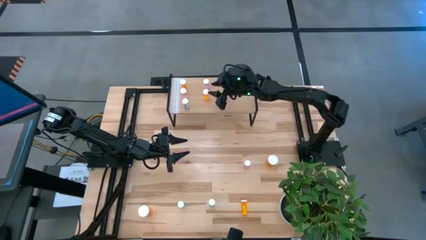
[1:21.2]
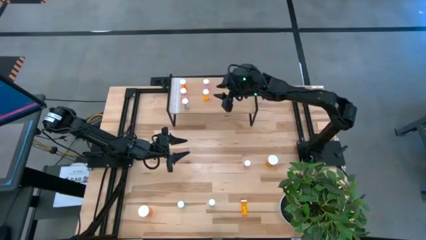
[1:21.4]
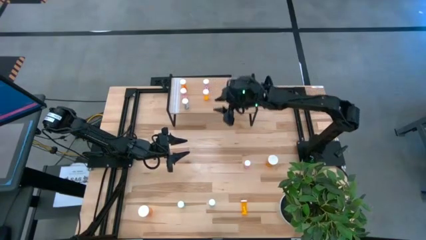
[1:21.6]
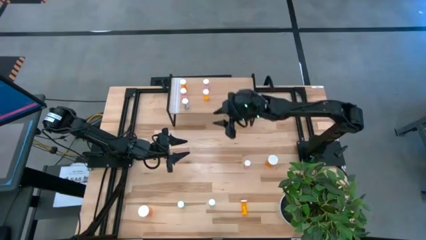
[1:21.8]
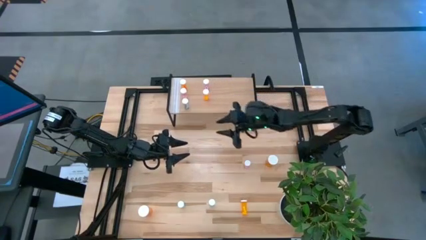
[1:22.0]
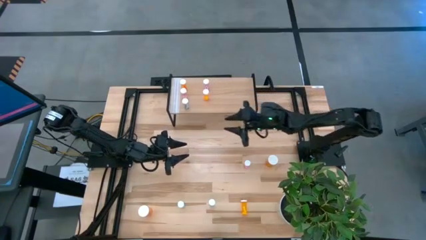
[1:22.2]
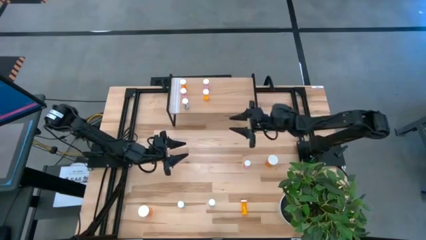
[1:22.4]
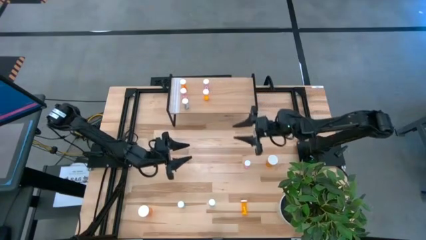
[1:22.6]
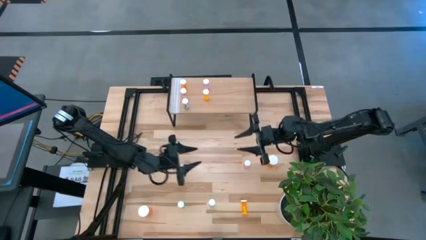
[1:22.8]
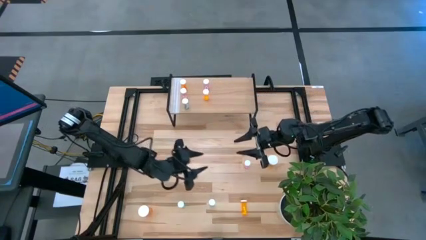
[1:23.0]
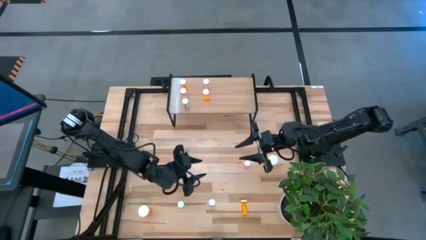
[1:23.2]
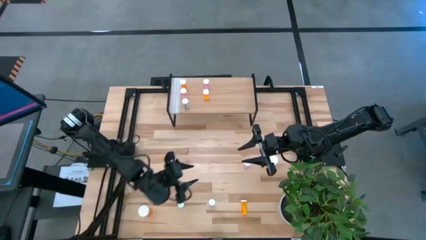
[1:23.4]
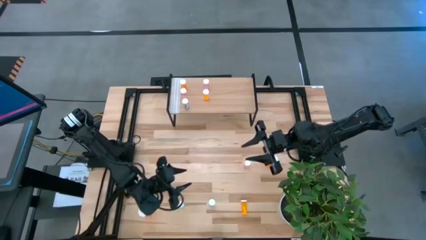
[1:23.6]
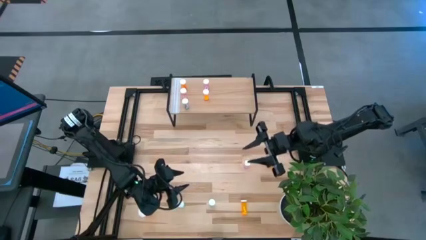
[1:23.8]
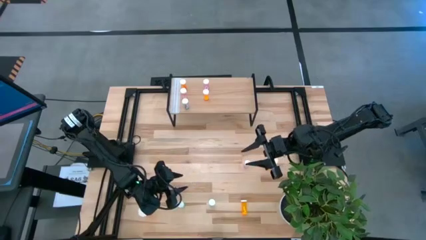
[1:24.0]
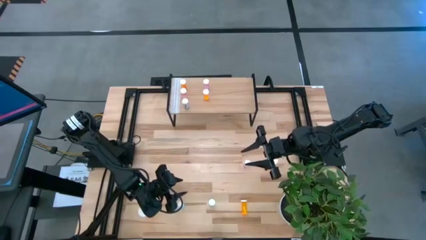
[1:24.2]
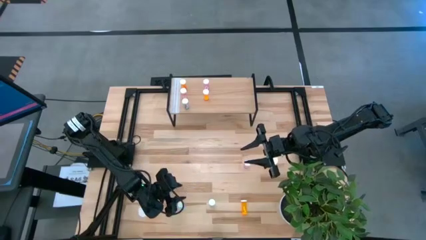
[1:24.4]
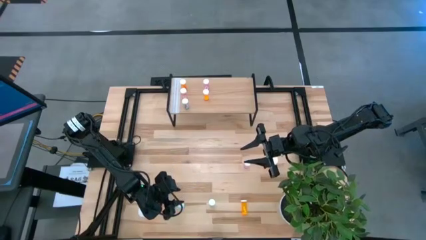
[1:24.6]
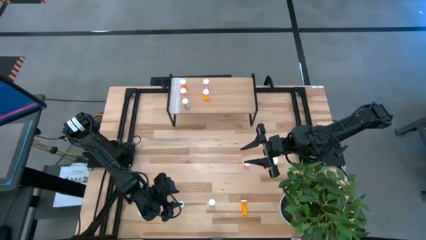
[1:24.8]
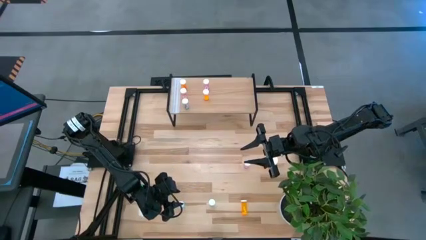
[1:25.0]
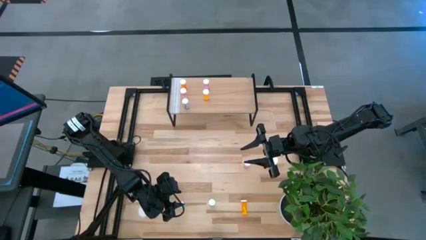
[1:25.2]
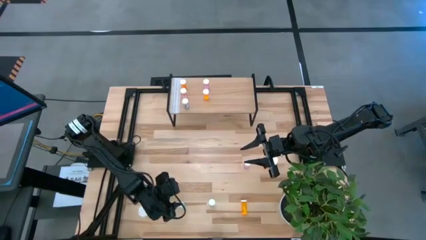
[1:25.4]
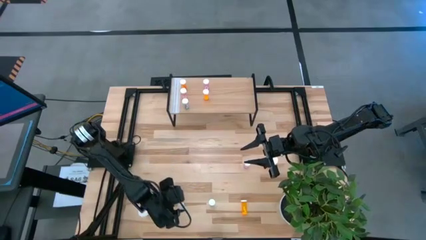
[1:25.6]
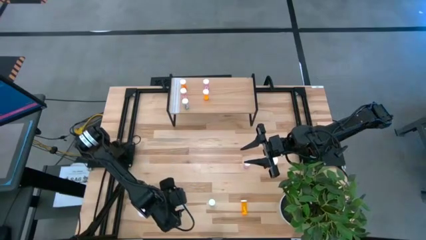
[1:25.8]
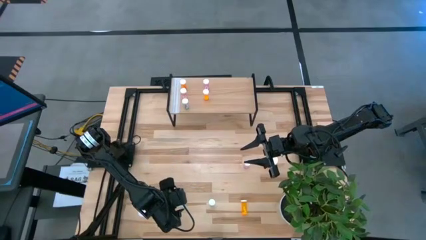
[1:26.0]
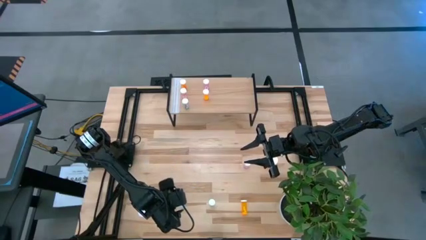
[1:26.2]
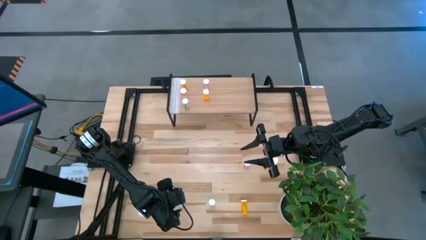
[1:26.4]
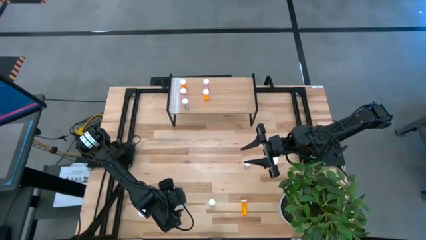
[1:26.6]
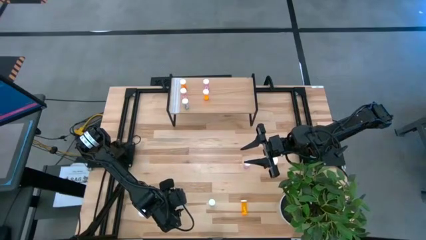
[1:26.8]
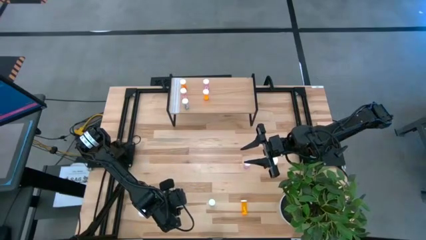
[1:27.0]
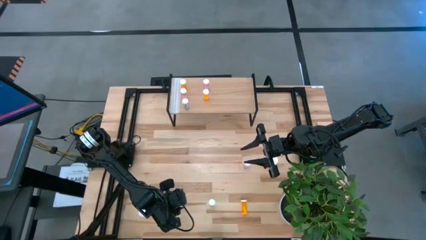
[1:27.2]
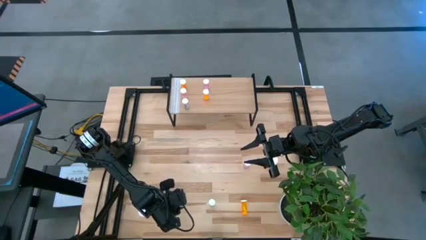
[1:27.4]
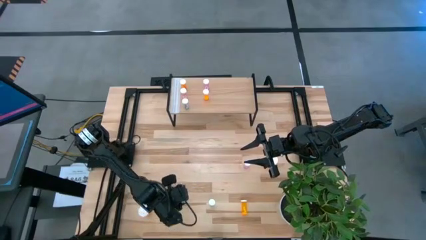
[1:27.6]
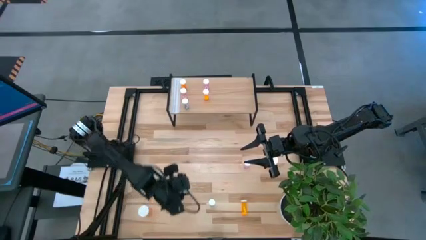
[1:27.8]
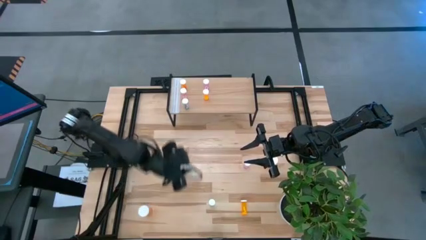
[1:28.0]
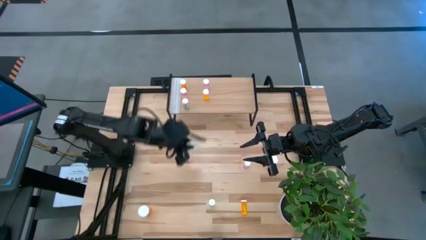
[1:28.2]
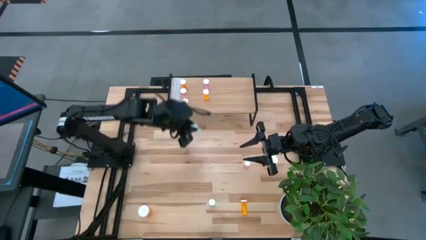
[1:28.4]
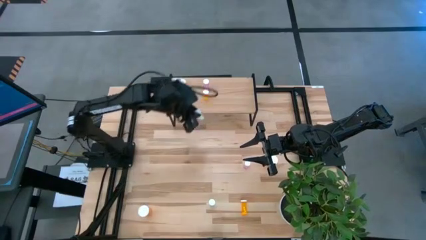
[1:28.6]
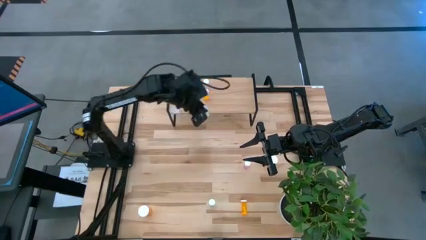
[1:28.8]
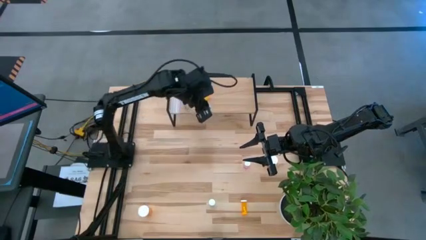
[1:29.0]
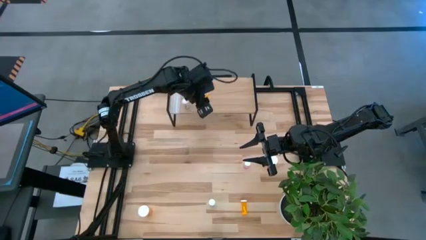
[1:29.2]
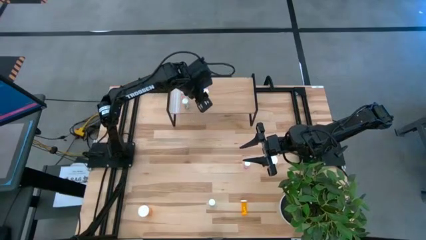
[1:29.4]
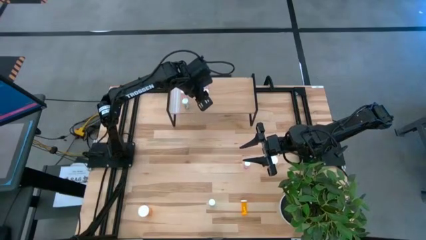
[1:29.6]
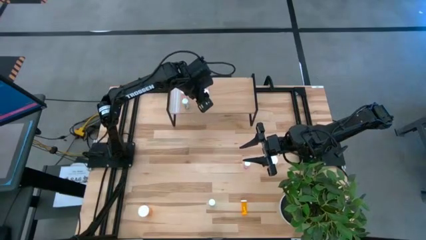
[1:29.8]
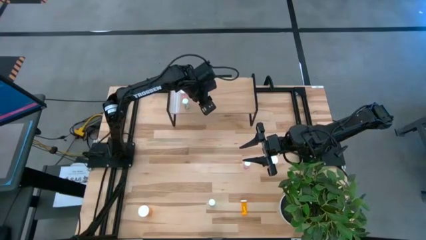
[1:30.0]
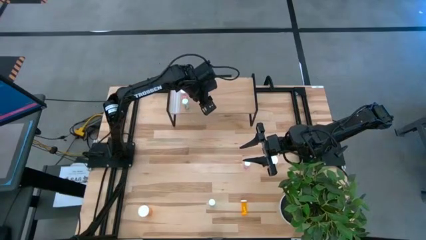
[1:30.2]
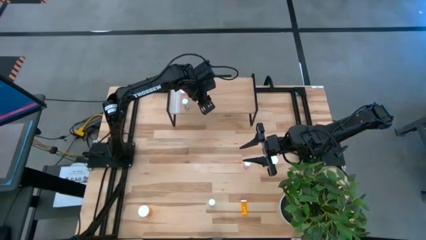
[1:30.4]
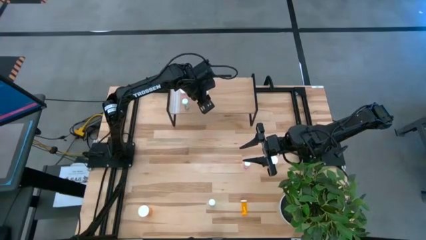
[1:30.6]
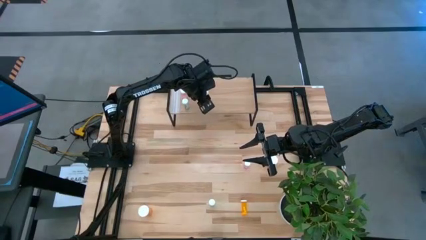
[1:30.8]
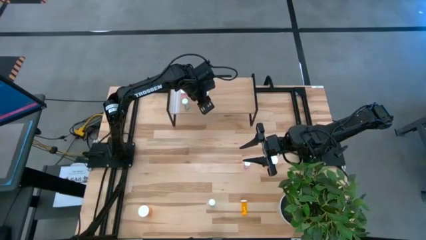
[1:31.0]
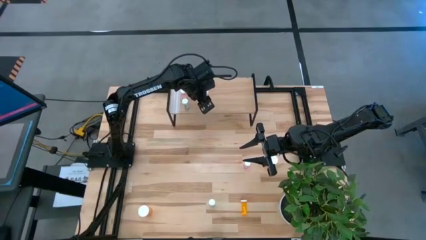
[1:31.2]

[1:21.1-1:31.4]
Task: Pick and place medicine bottles onto shelf by color
Put the left blue pill bottle on the shelf

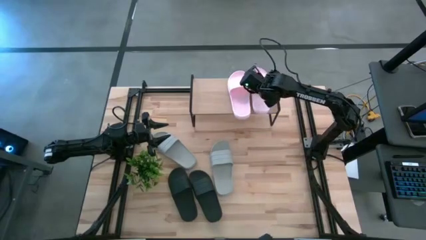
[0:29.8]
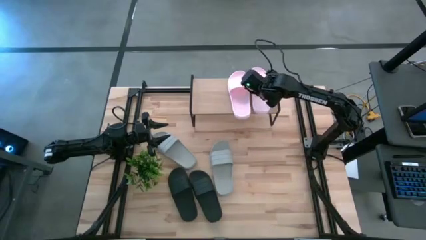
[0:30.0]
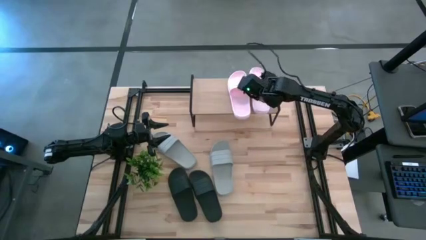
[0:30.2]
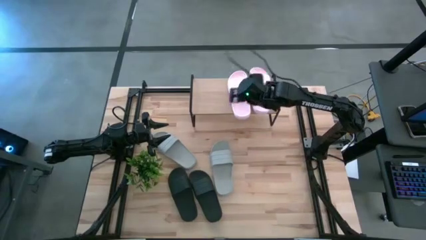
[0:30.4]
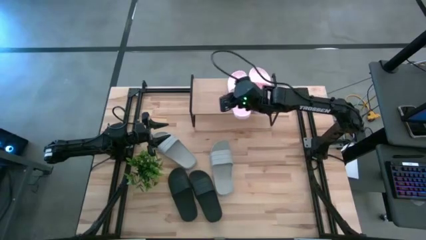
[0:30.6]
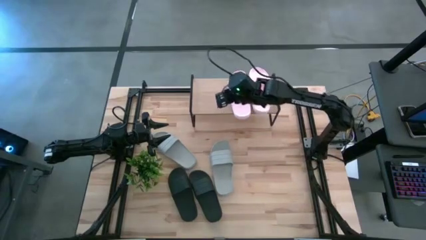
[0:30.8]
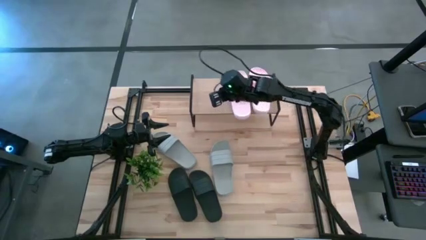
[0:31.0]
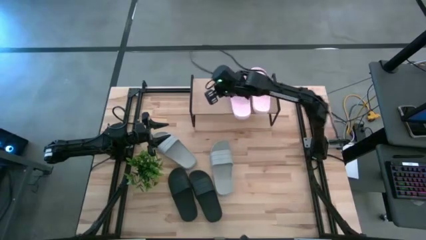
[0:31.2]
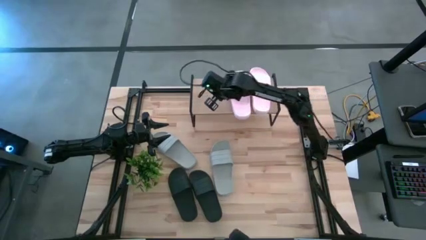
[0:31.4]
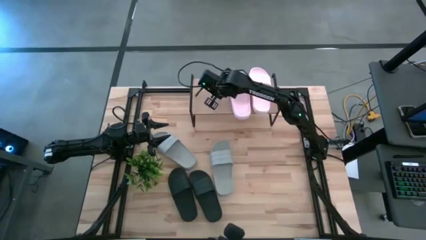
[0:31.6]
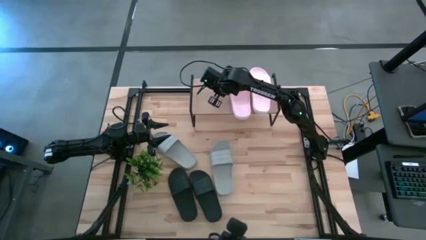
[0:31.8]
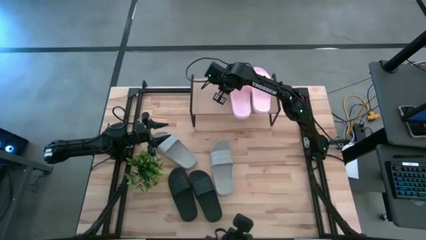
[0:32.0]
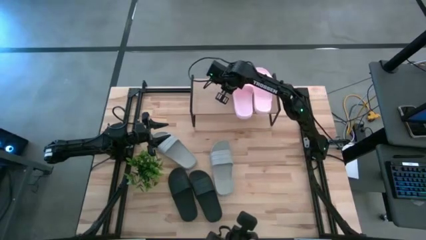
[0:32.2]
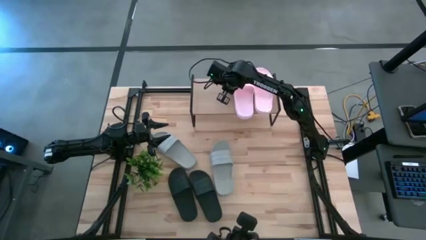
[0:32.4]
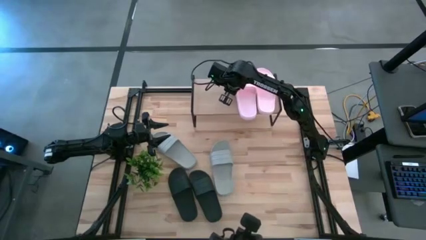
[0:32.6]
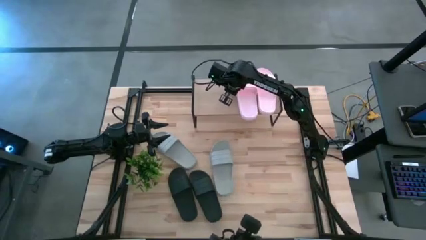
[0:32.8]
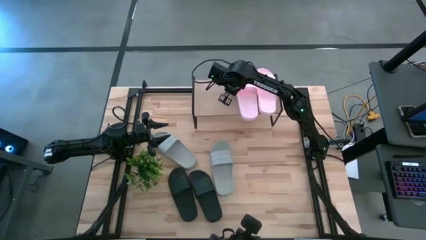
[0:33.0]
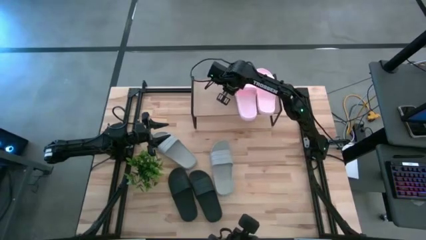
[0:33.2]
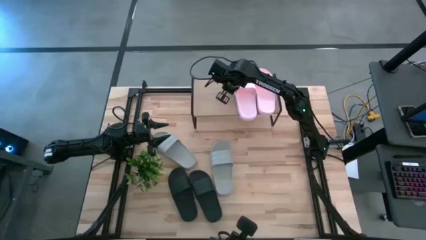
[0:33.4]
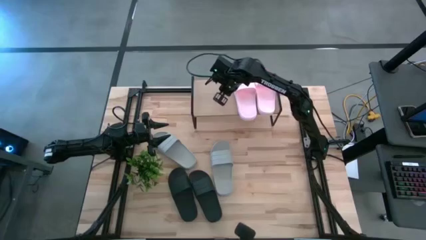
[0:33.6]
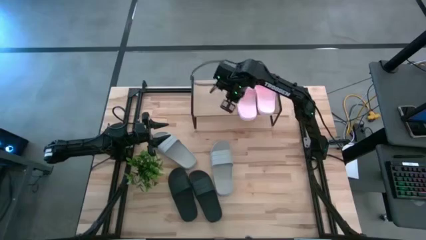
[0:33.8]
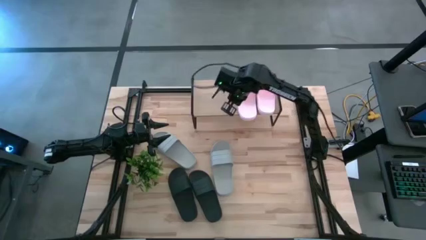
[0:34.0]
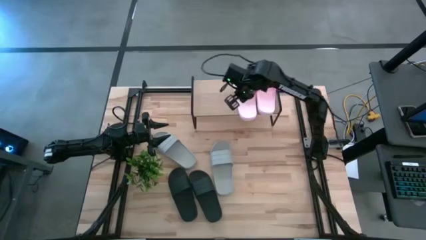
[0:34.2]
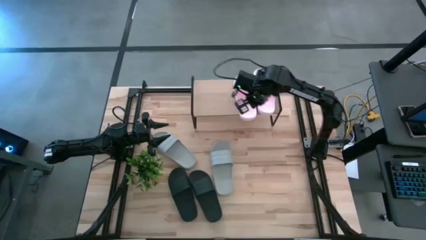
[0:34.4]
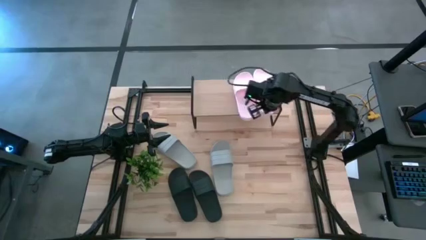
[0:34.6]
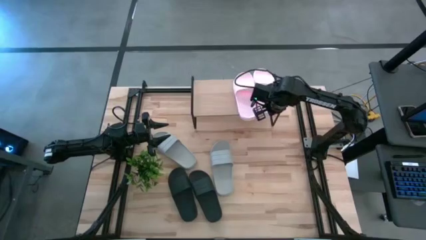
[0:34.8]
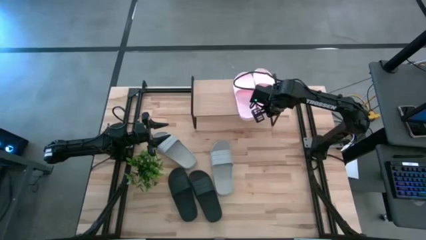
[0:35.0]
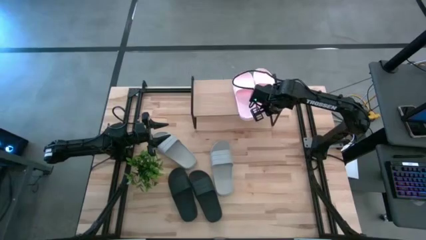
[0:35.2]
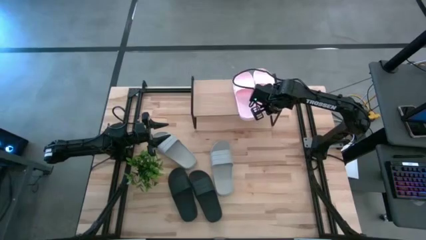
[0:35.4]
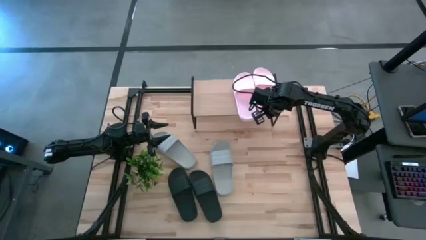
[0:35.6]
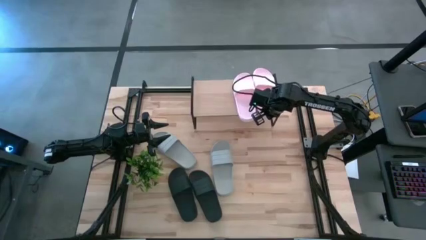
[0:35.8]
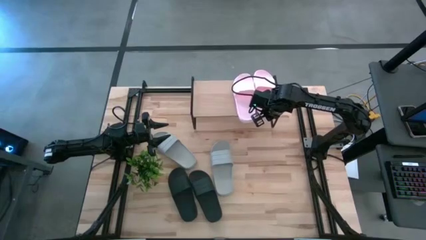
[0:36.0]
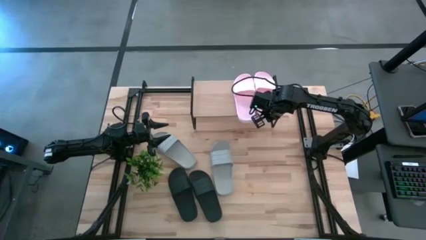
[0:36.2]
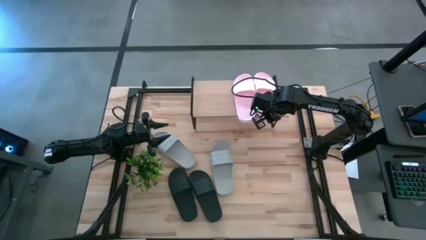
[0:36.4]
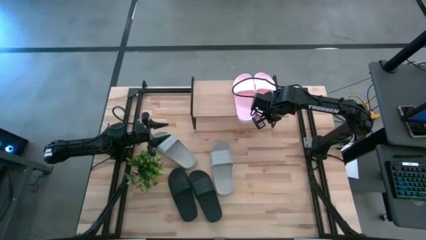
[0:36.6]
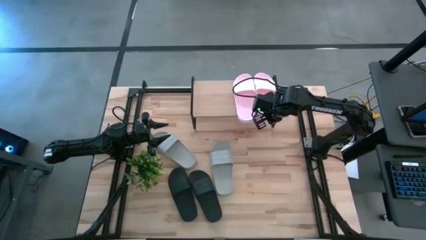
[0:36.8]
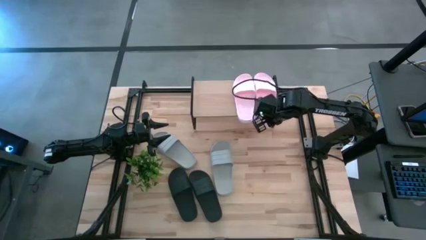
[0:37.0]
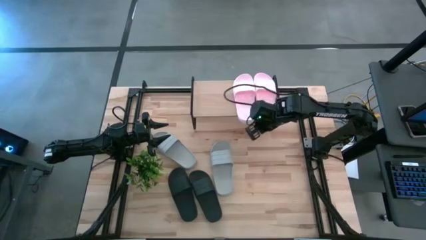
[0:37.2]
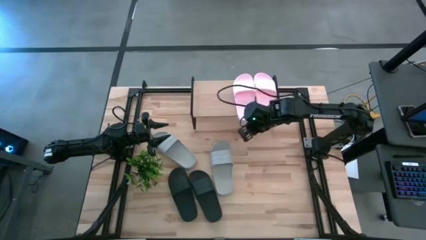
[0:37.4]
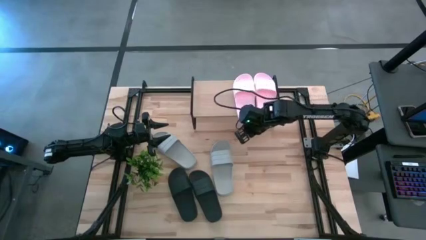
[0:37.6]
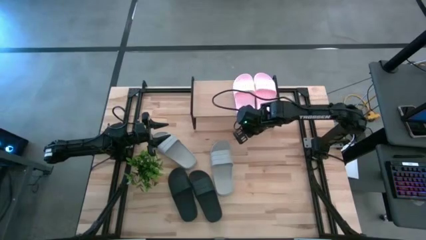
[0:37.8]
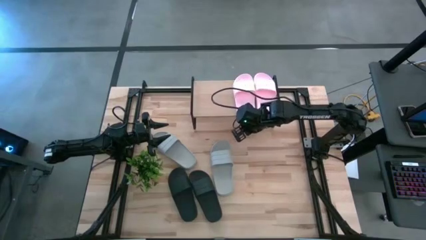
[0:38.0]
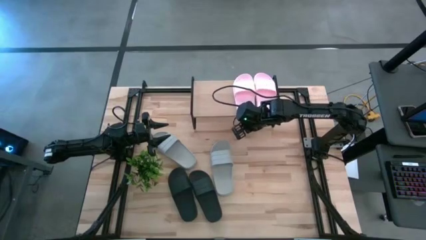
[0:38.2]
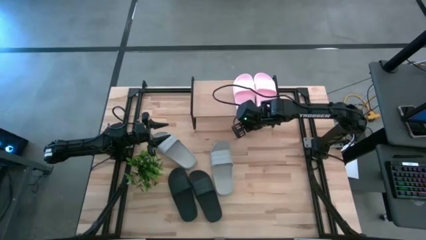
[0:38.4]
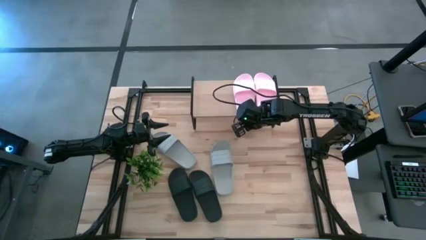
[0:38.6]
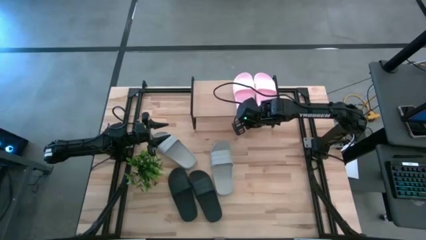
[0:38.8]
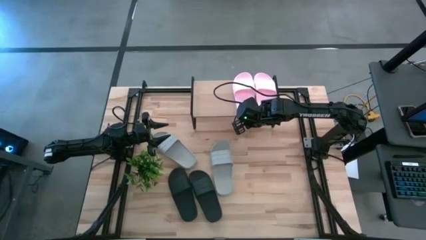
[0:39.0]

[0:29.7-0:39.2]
Task: Pick and place slides into the shelf
Adjust the pink slides on the shelf
